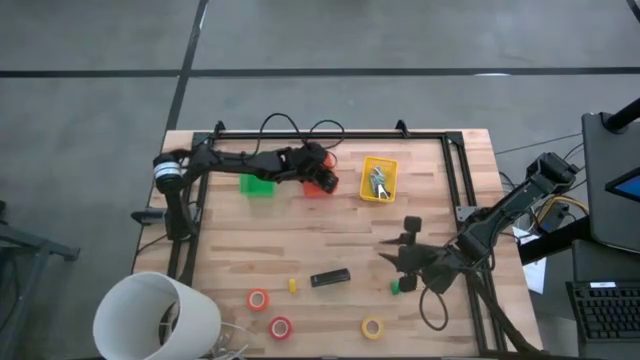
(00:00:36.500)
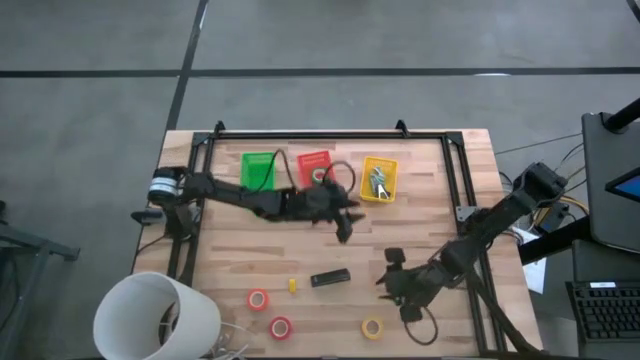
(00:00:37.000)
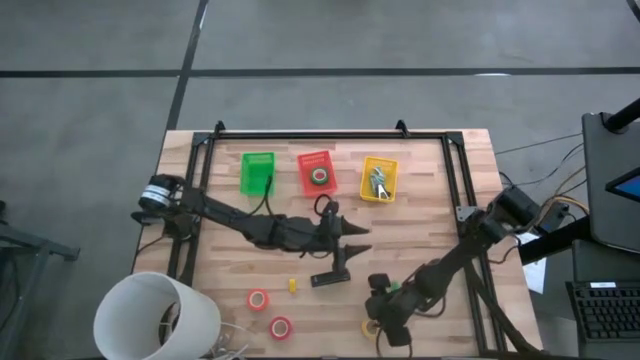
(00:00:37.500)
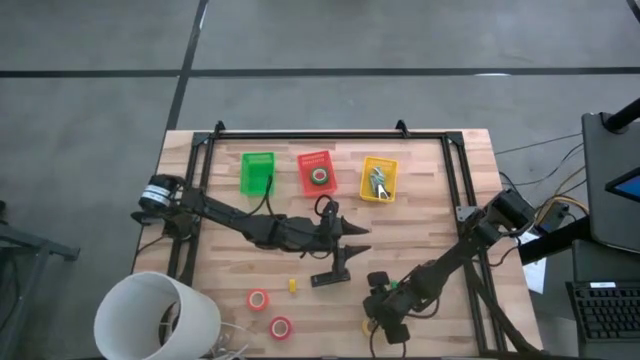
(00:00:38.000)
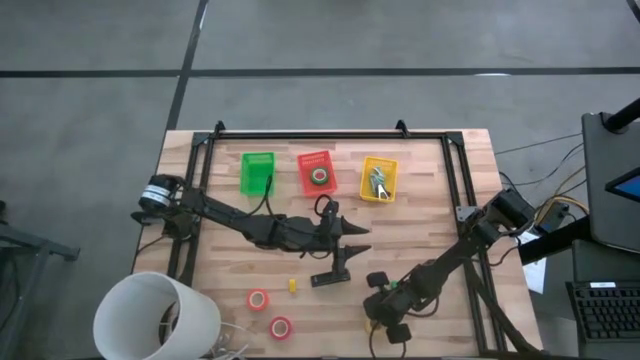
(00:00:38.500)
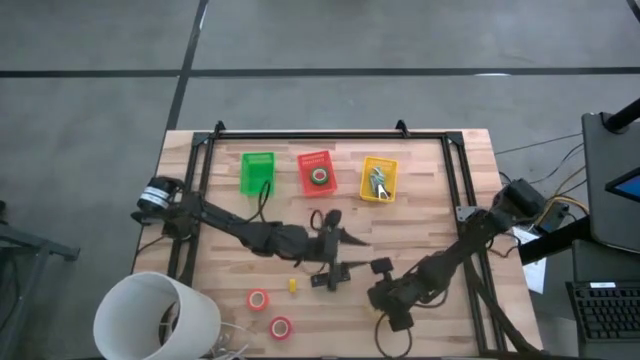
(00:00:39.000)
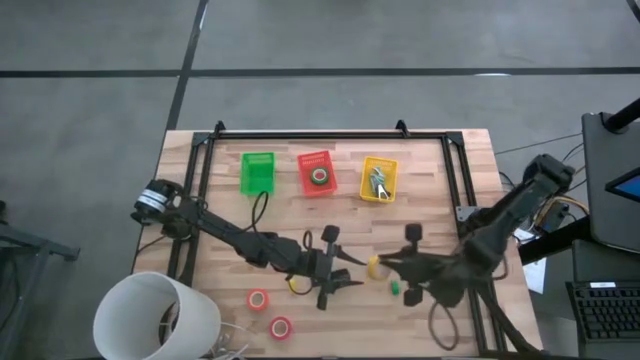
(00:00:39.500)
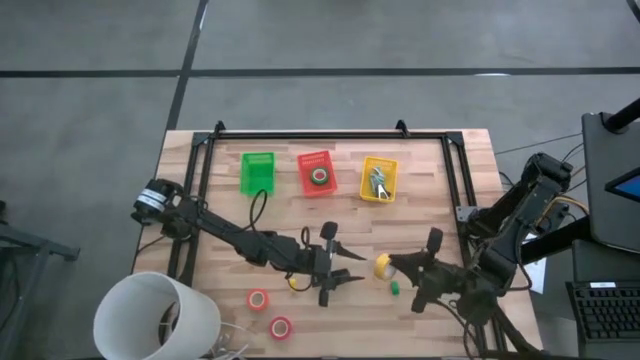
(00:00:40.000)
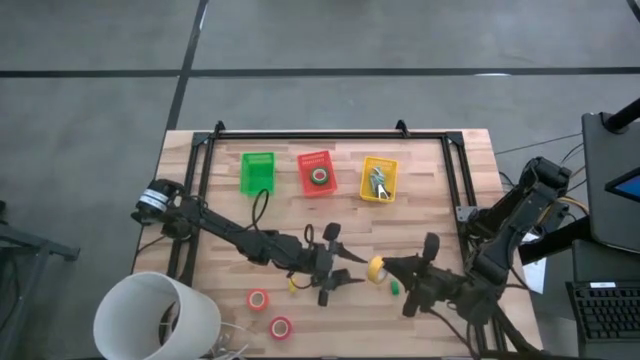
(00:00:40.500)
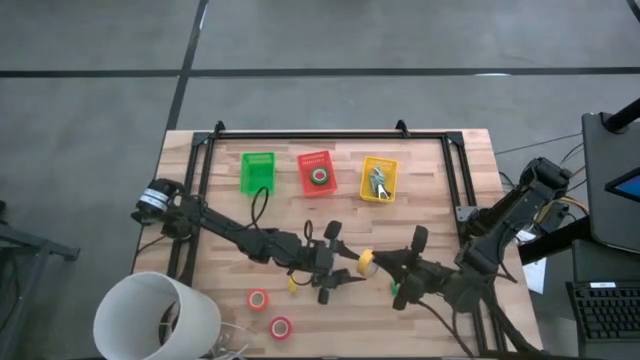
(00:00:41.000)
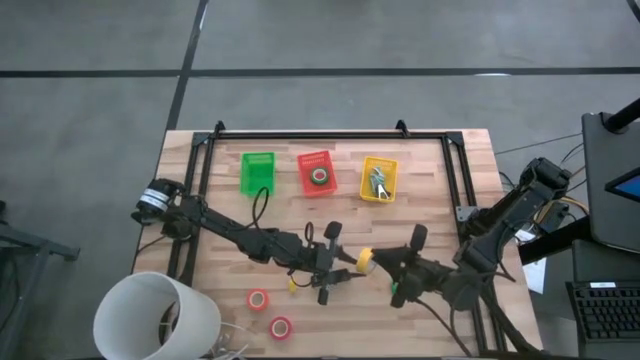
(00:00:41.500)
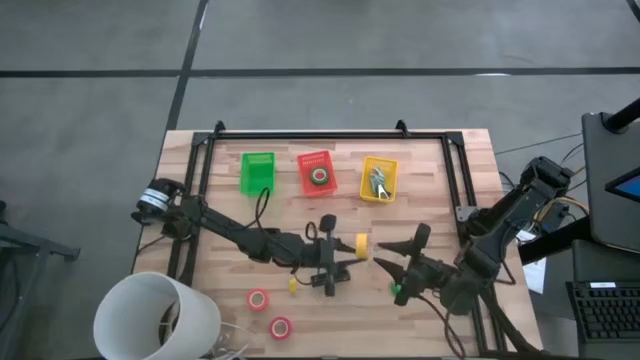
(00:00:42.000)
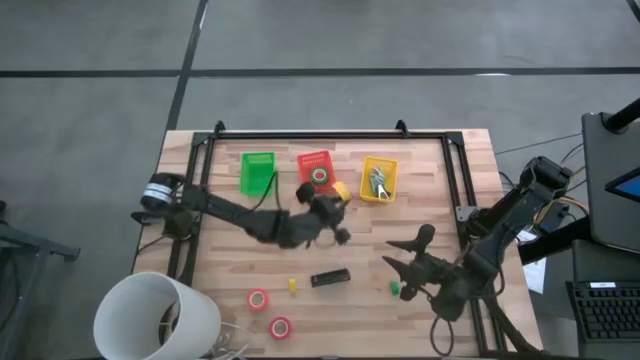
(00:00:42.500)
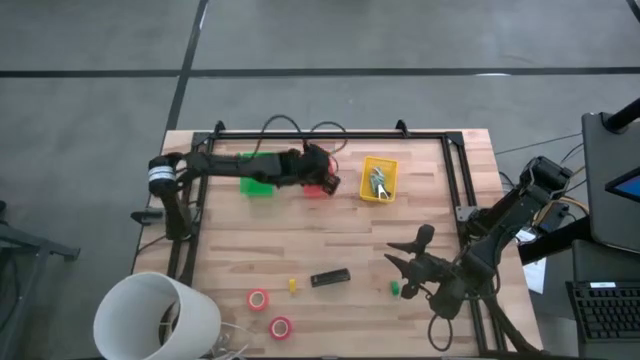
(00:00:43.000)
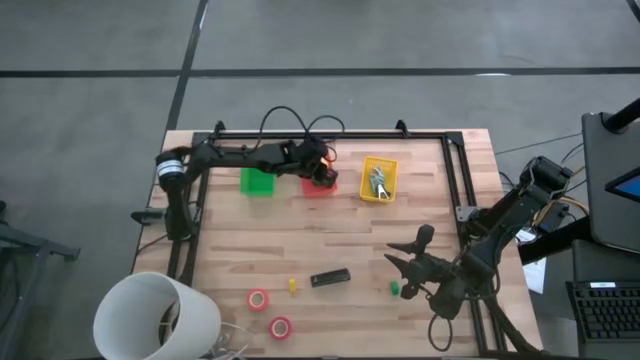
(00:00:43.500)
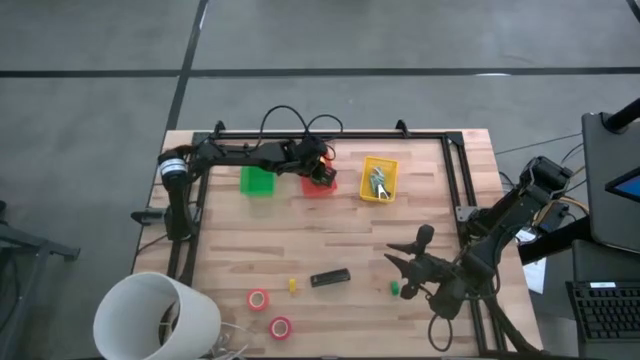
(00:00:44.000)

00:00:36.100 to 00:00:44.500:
Task: Pick and place Stapler, Stapler remover, tape
Put the yellow tape into the orange bin

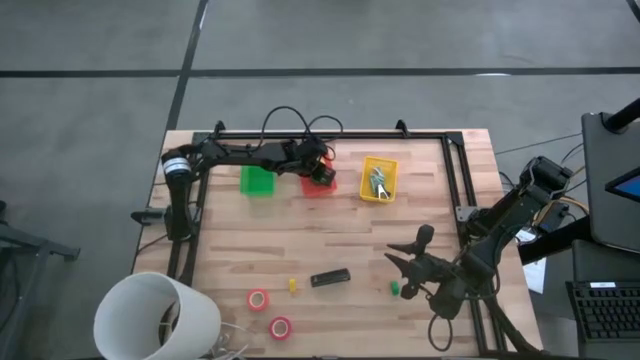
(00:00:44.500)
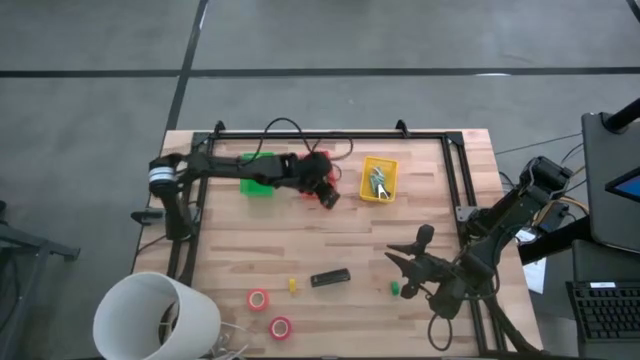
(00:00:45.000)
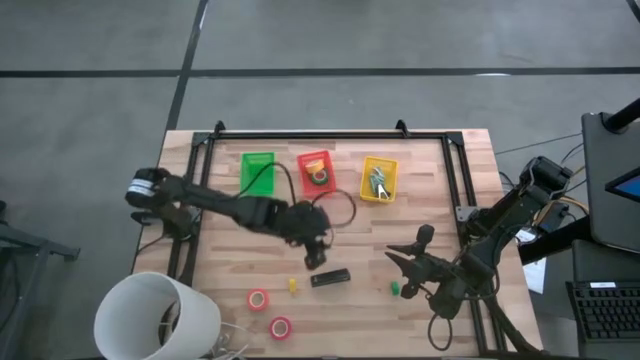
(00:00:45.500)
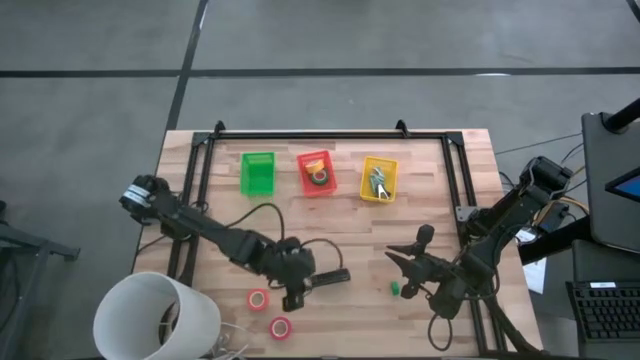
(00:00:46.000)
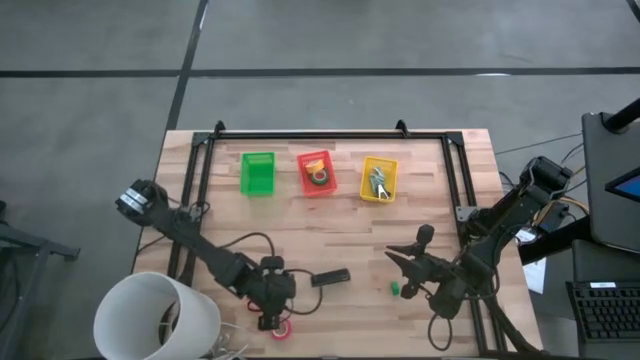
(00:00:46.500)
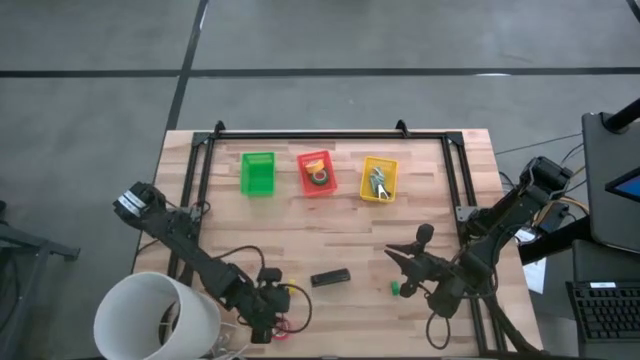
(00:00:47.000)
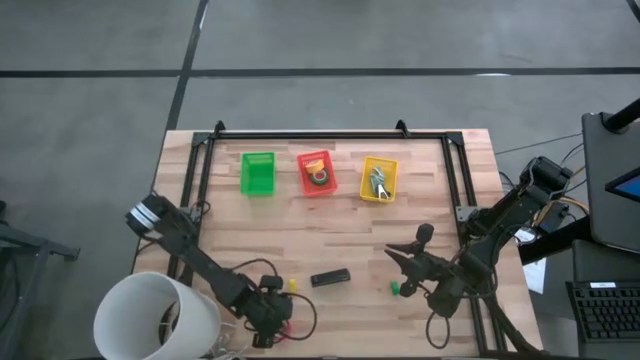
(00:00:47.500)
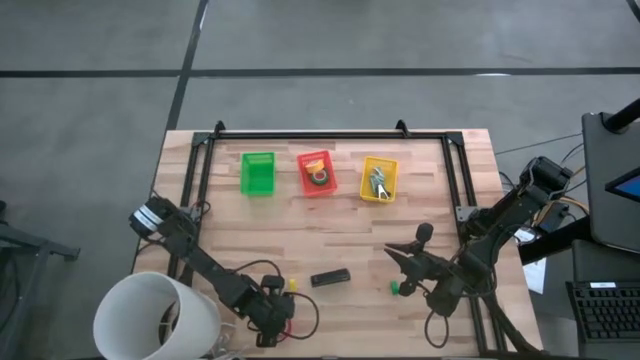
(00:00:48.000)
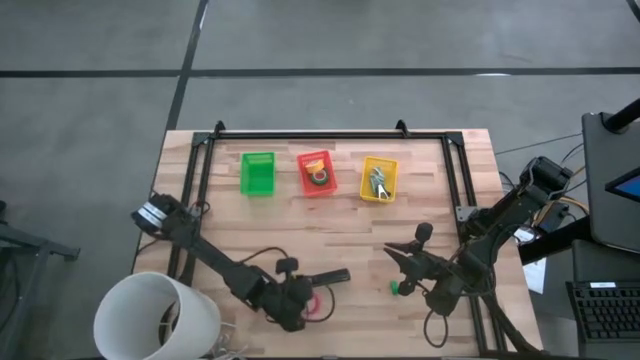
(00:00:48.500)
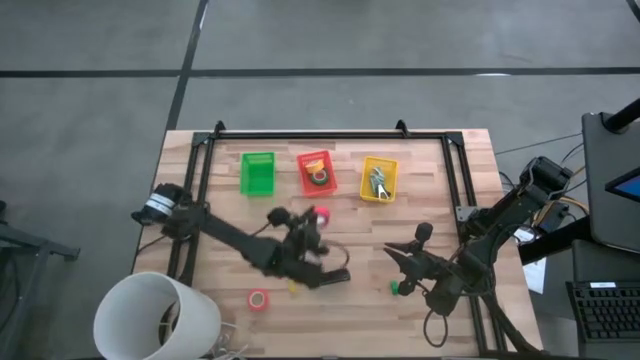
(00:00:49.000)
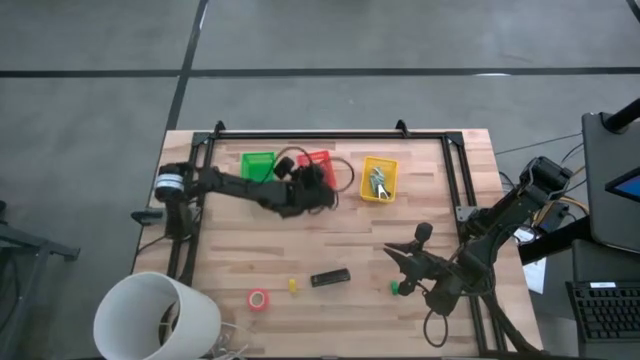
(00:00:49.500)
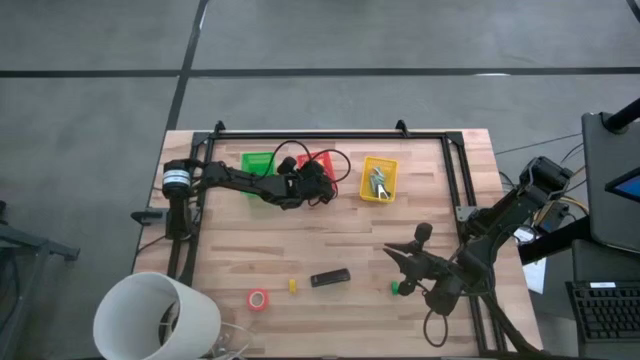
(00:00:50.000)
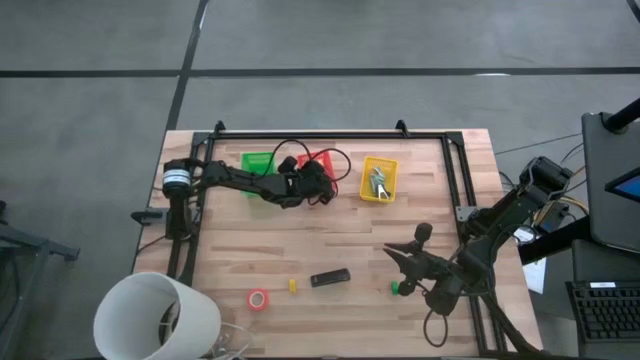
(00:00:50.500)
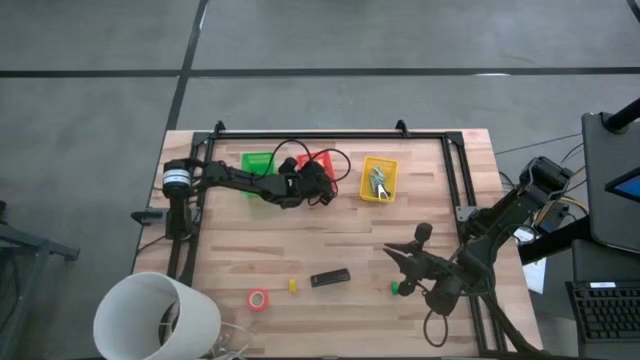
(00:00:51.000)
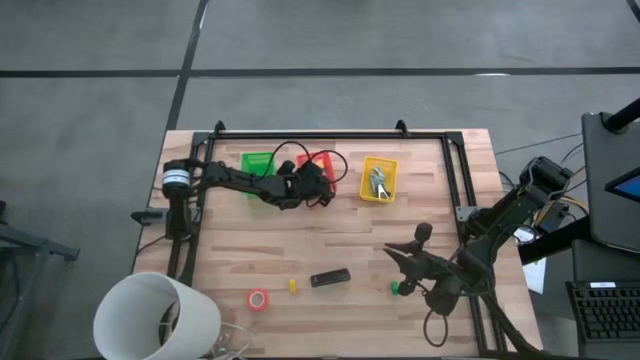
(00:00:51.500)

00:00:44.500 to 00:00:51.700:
Put the red tape into the orange bin

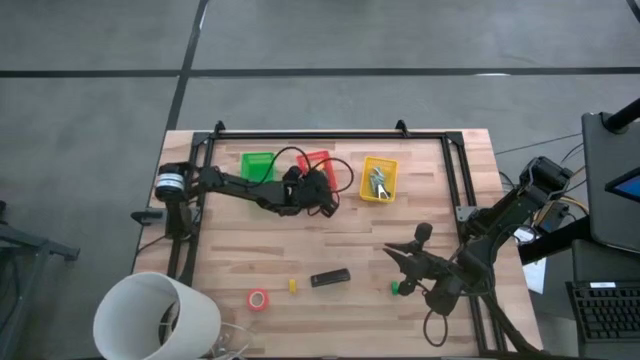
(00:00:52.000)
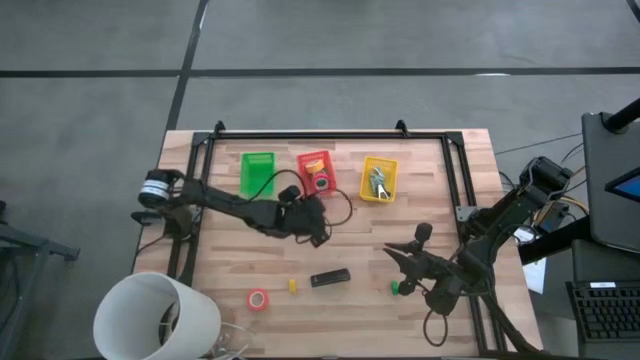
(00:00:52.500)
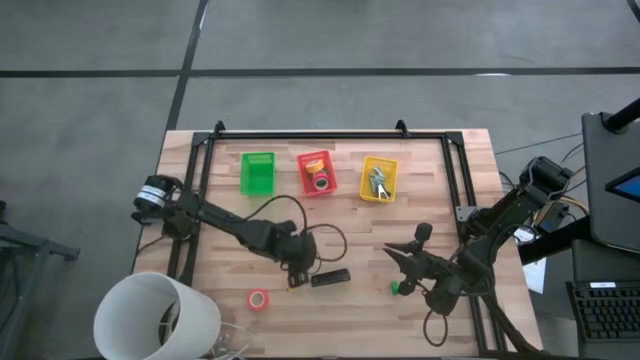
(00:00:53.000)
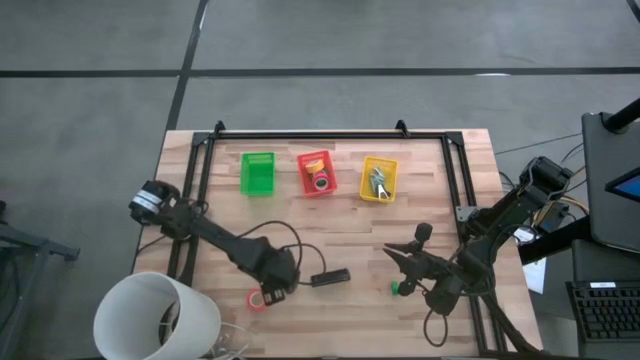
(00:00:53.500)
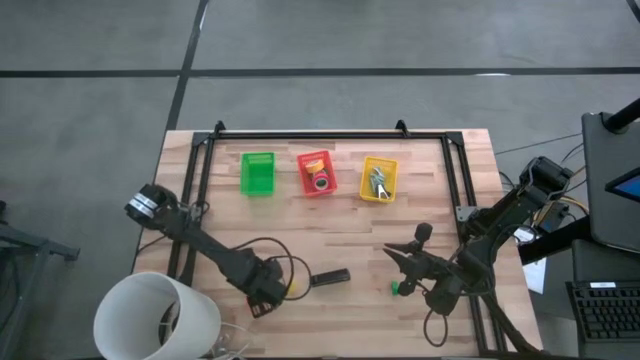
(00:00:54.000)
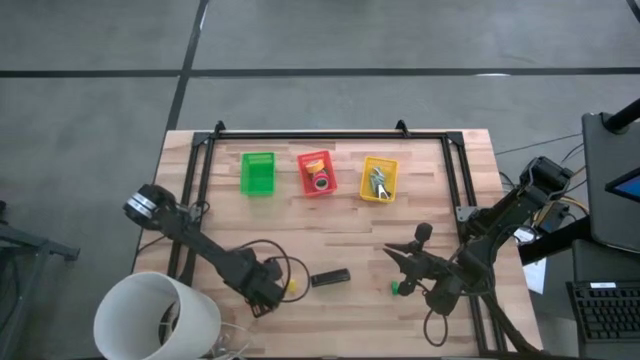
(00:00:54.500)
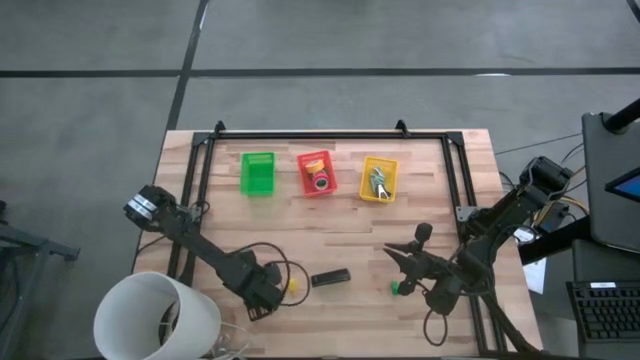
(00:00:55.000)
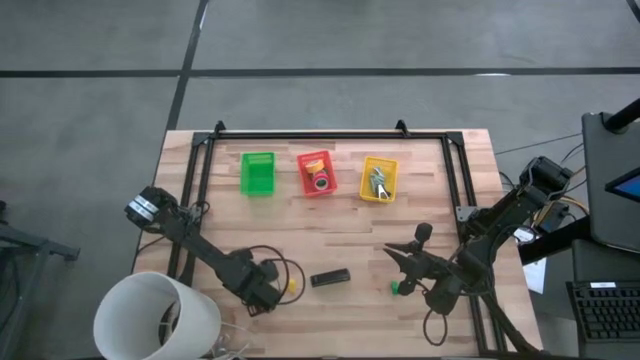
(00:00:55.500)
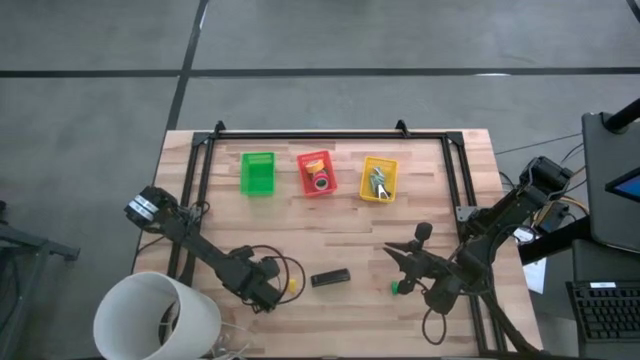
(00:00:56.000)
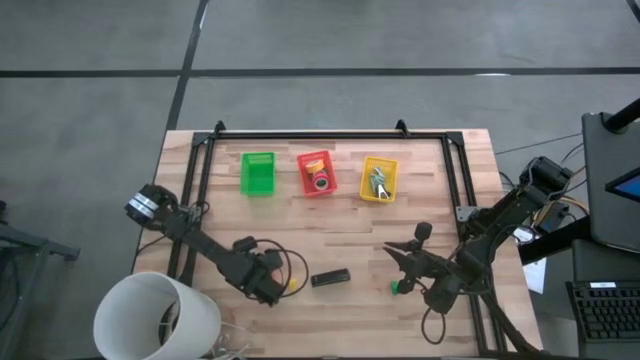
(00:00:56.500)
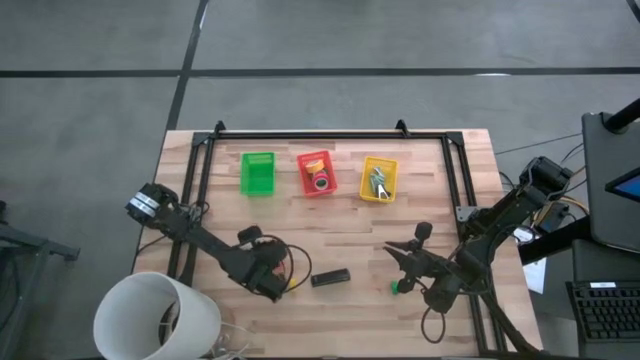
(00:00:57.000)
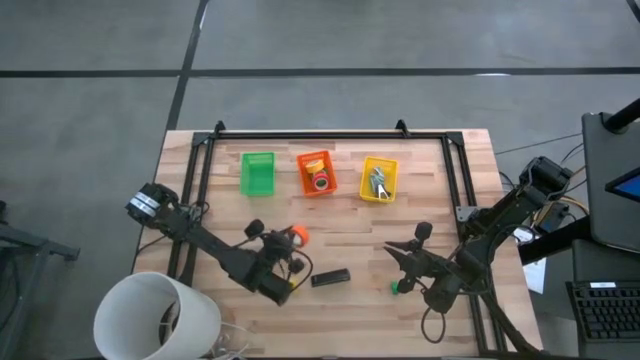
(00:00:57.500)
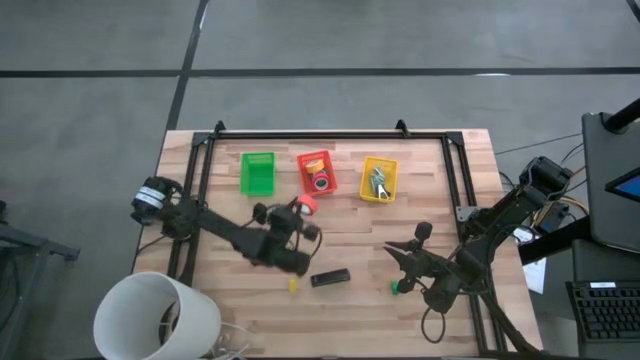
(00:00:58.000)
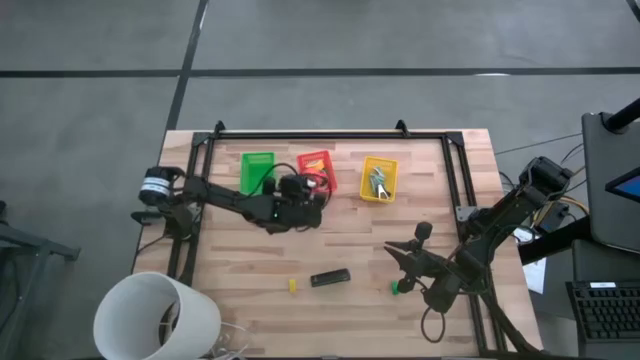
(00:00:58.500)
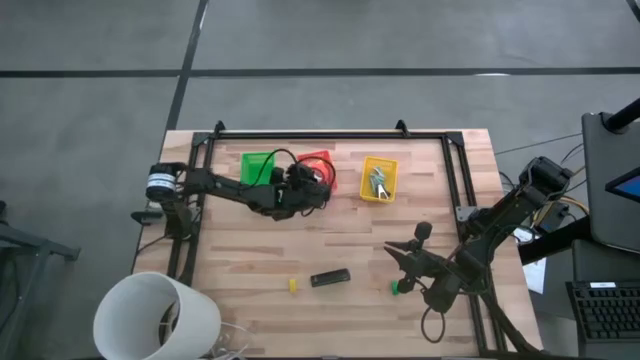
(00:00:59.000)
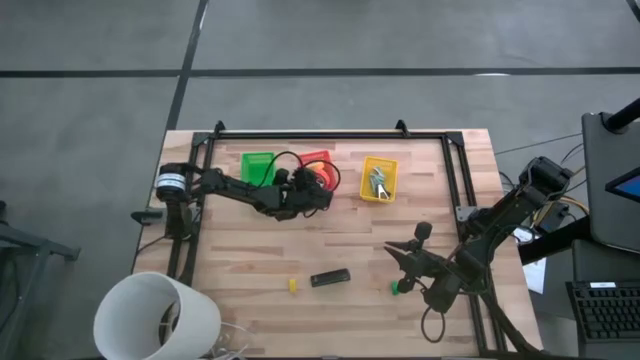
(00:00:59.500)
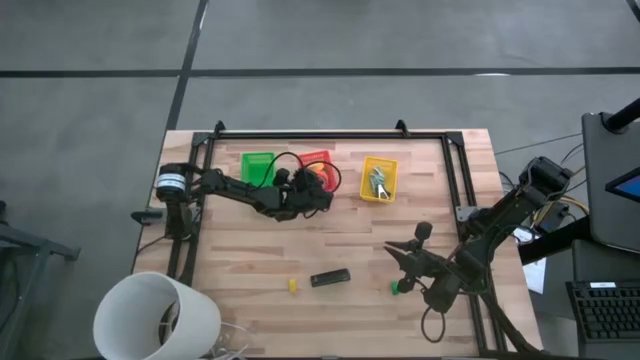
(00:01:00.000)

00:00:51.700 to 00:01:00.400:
Put the orange tape into the orange bin
